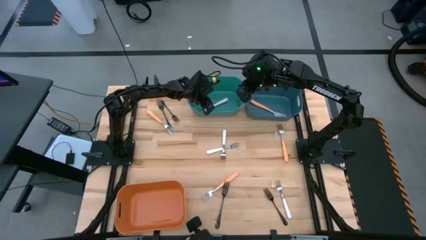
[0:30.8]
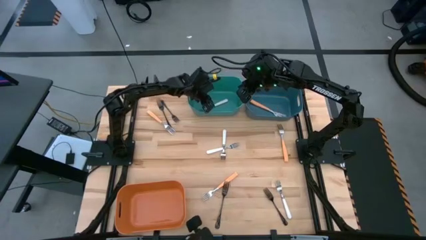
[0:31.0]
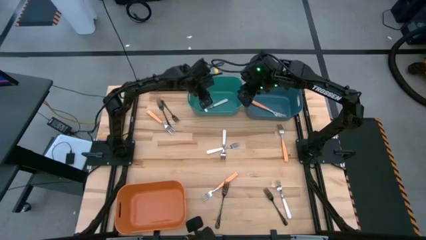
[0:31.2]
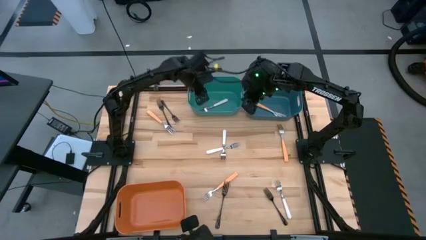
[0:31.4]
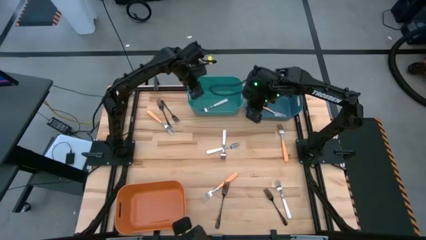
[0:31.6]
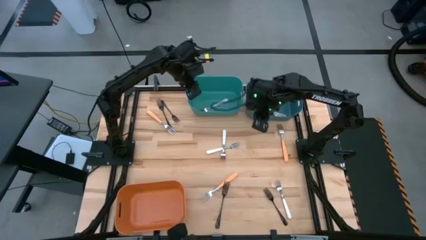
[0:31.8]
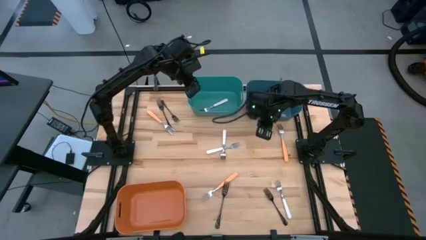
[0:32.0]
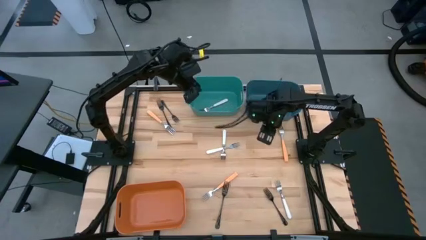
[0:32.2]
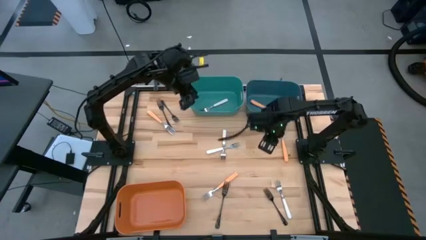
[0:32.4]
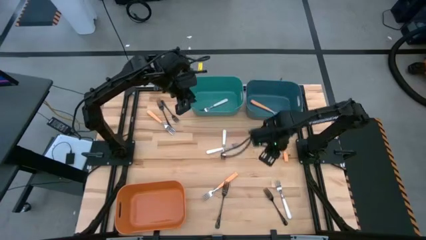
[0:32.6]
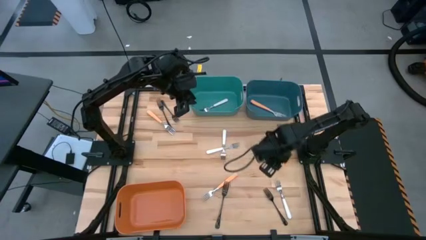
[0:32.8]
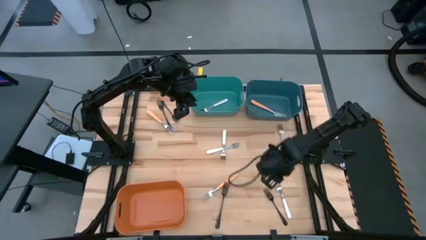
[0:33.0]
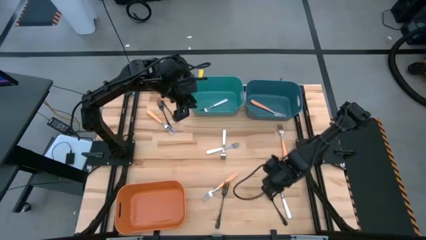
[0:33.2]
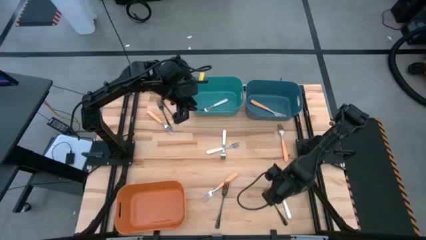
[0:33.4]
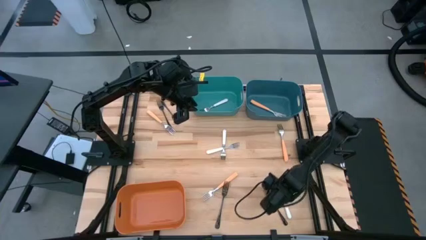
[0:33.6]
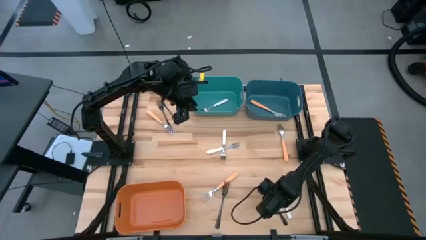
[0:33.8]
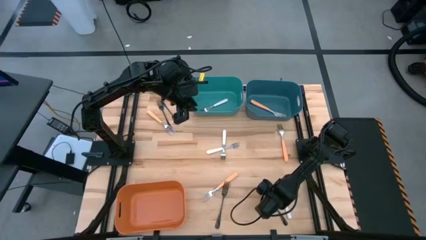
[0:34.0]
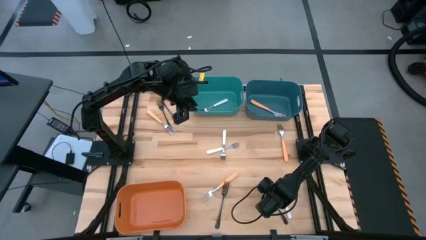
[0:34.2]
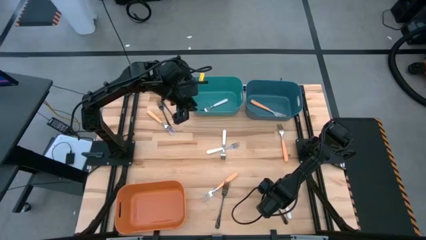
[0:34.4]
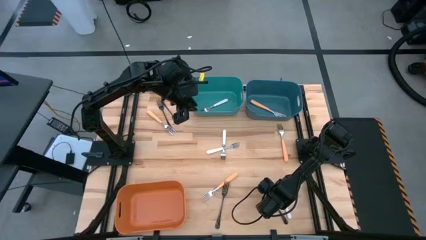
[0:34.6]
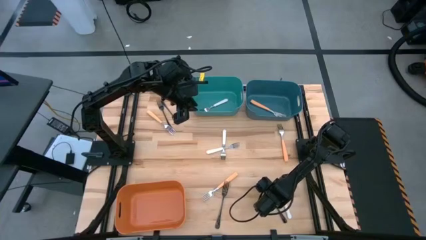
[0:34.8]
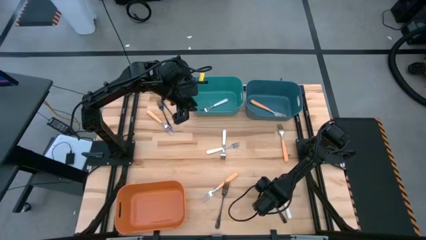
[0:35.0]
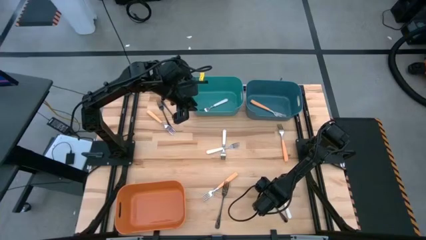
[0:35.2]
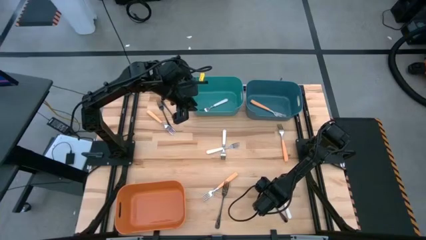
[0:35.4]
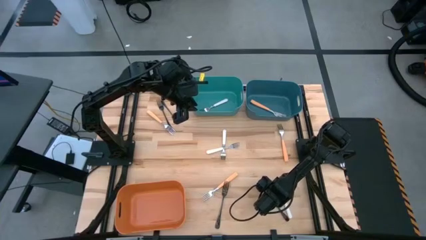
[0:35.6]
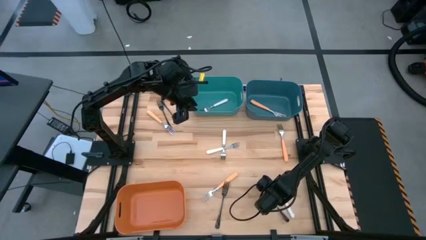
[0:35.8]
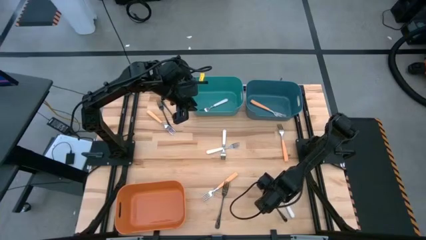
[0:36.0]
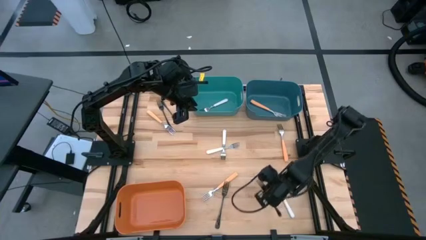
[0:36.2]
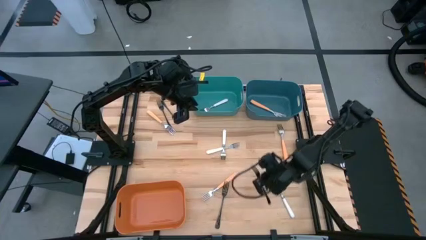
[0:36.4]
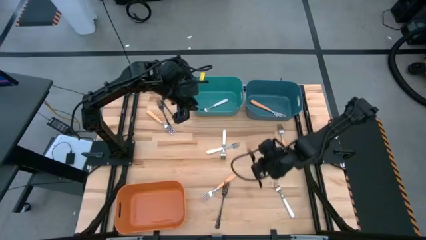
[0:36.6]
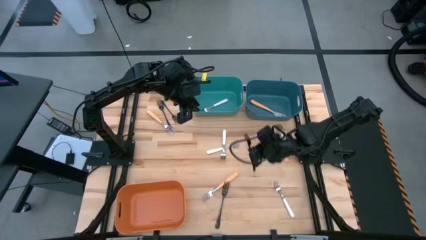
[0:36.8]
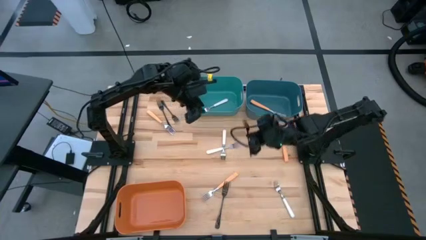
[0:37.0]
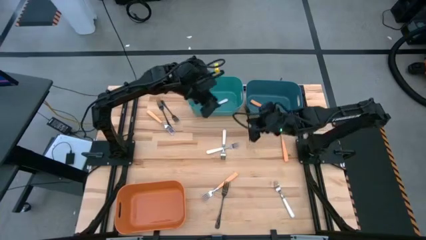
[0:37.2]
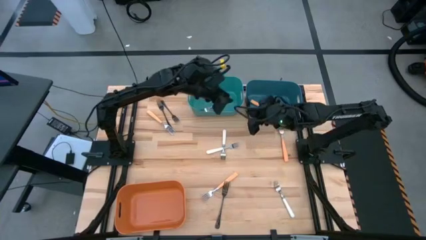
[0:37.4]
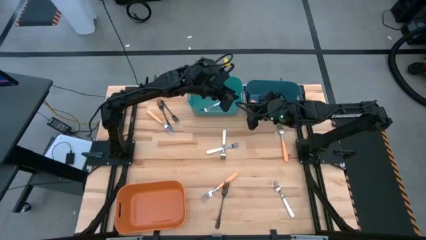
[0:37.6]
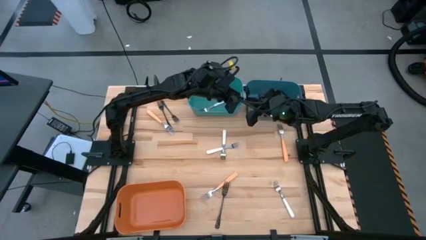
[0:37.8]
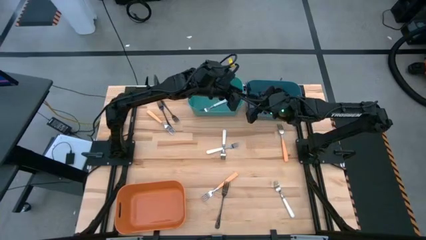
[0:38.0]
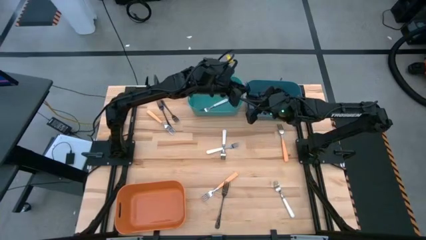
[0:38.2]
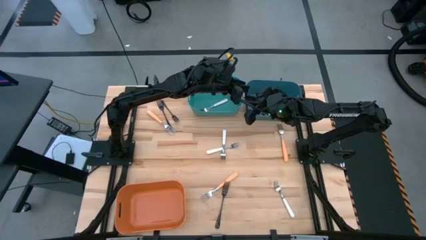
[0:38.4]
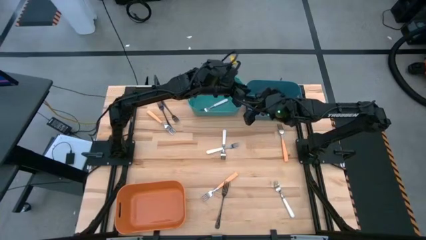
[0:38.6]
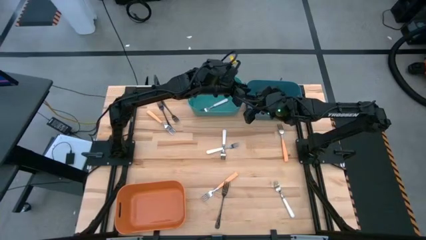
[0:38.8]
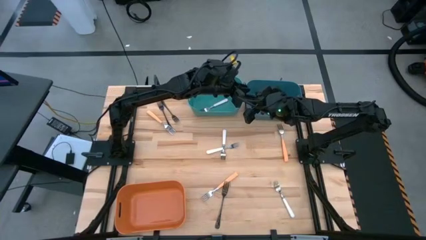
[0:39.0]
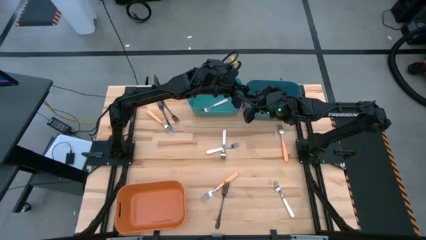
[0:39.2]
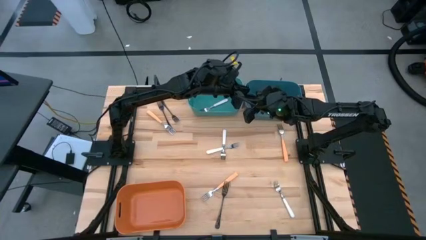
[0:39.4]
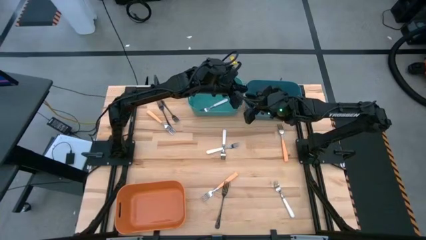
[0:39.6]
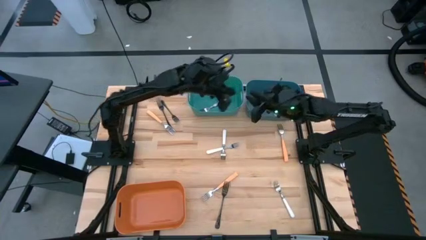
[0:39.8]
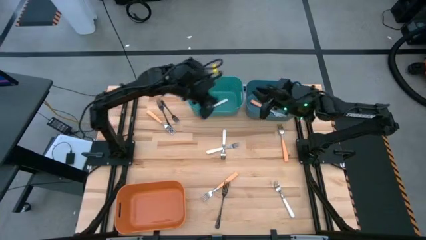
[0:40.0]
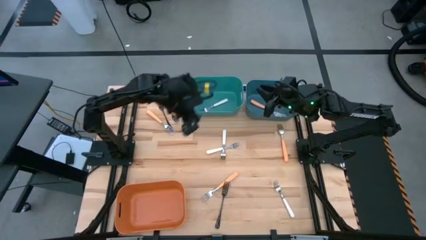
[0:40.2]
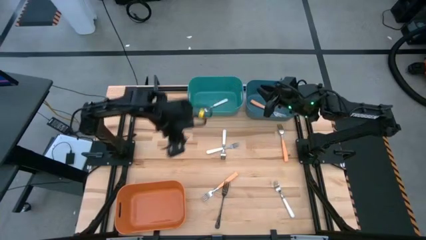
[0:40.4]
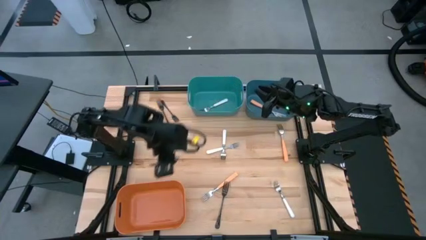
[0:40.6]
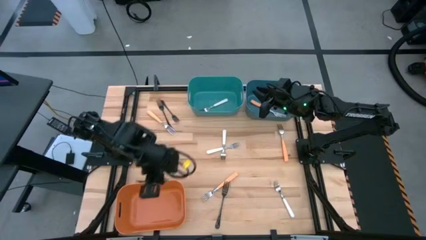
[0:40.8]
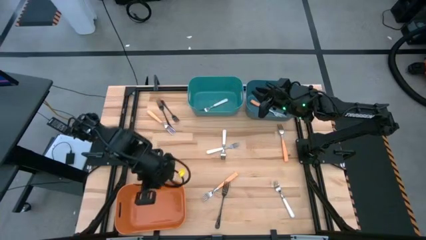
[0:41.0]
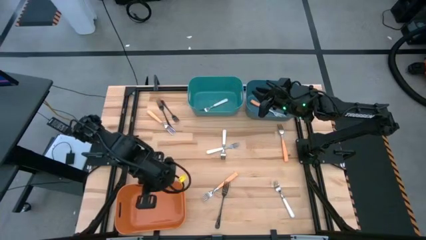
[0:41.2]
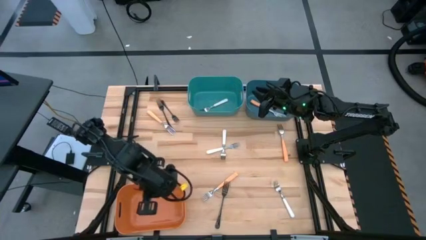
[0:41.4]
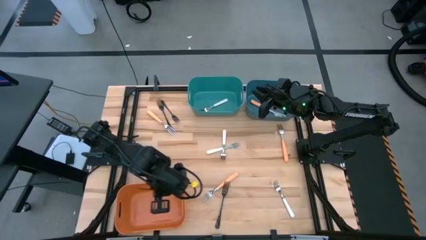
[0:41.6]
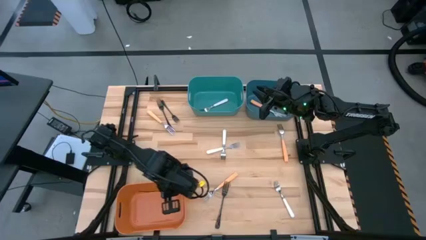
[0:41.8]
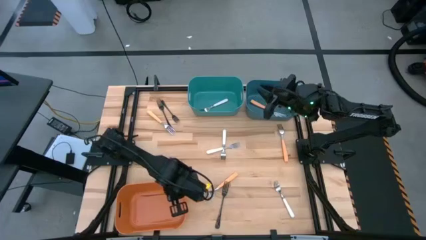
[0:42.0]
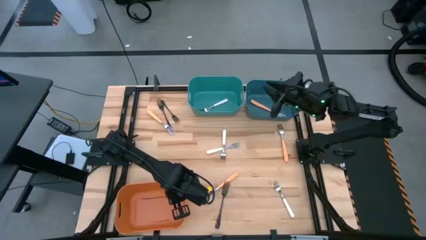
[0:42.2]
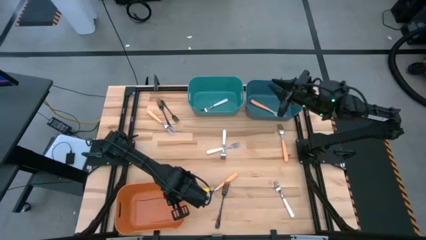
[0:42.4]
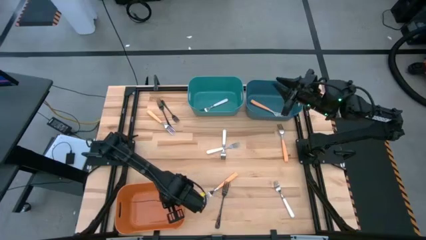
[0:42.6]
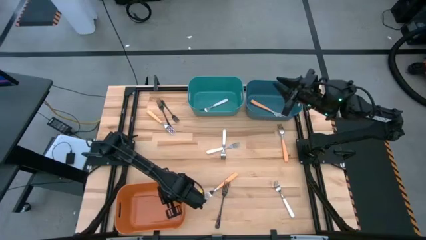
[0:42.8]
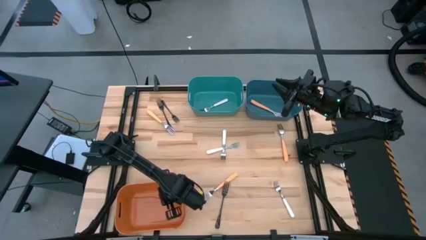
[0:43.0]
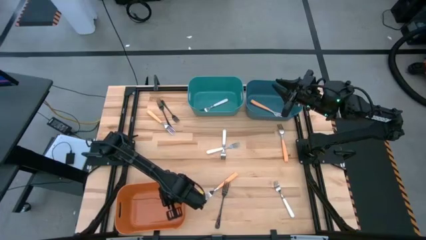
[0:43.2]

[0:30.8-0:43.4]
Task: Sort silverware by color (type)
Put the black fork into the orange bin

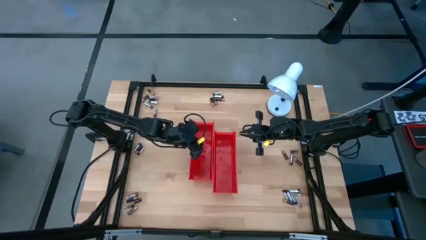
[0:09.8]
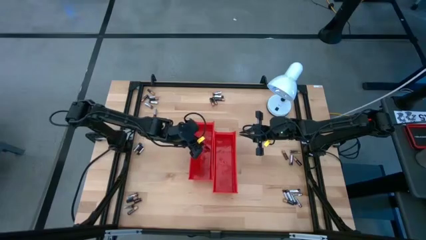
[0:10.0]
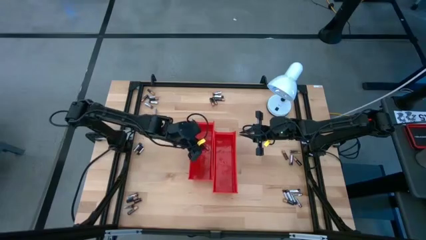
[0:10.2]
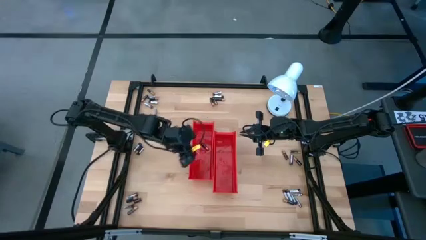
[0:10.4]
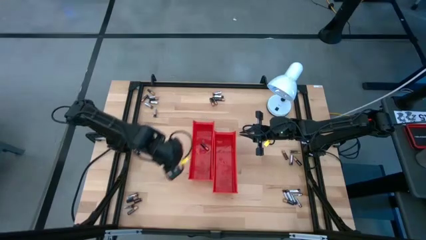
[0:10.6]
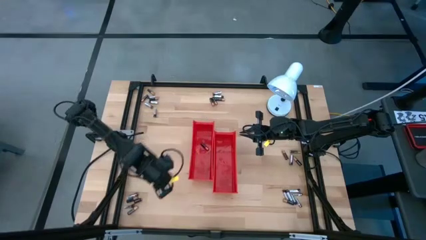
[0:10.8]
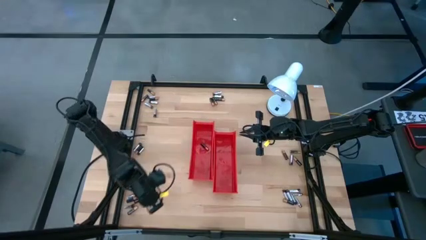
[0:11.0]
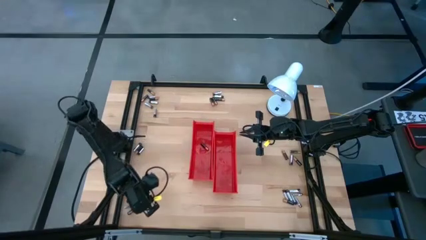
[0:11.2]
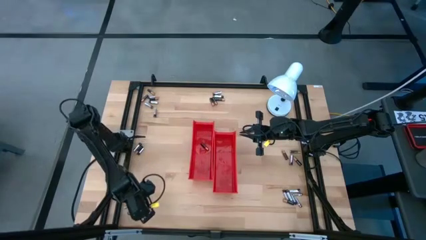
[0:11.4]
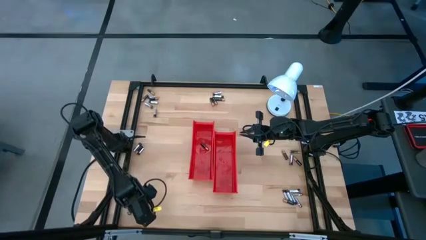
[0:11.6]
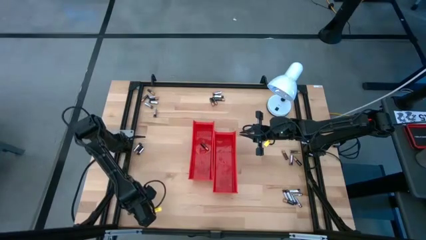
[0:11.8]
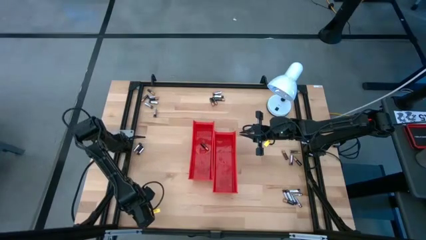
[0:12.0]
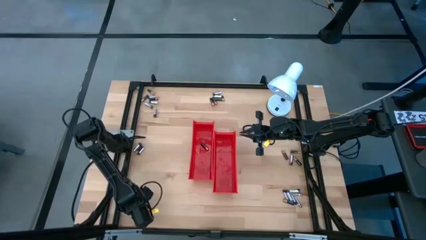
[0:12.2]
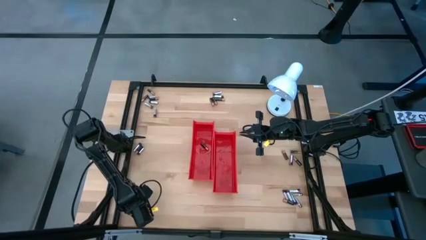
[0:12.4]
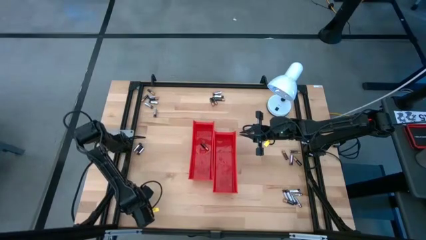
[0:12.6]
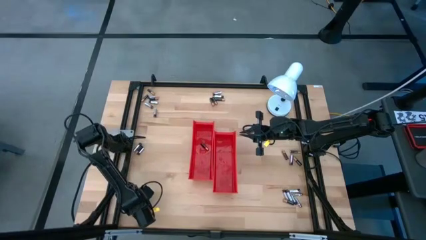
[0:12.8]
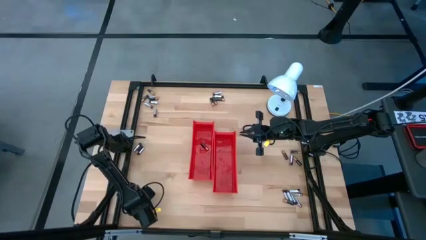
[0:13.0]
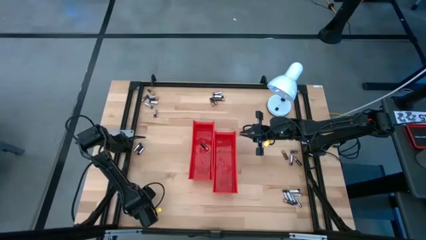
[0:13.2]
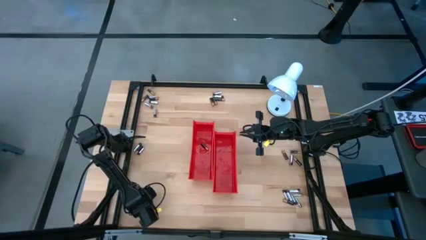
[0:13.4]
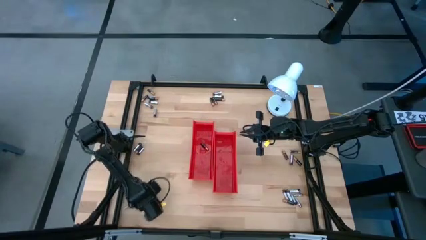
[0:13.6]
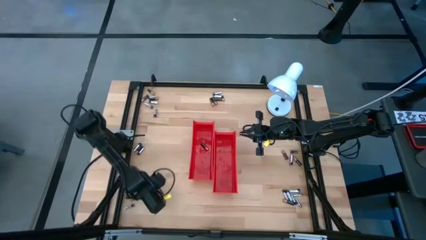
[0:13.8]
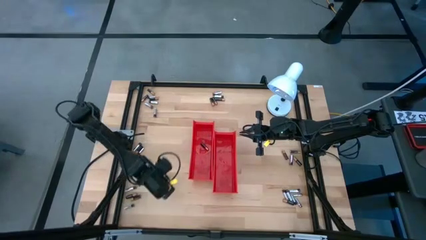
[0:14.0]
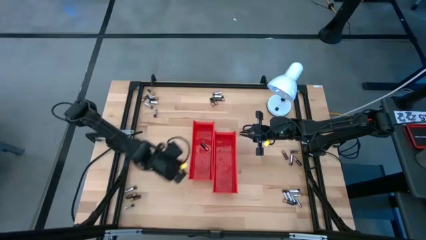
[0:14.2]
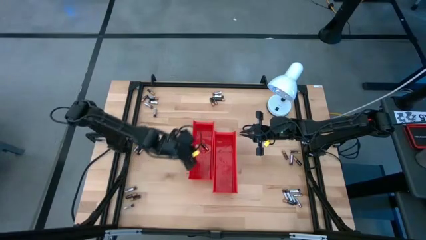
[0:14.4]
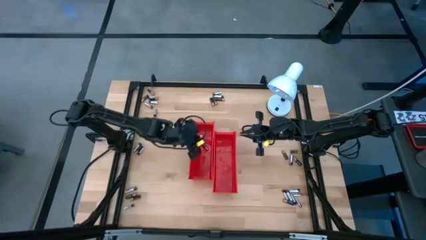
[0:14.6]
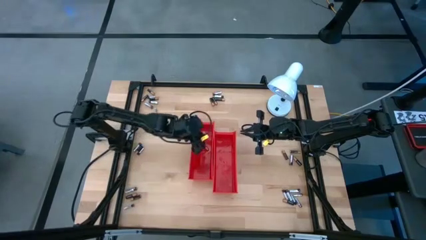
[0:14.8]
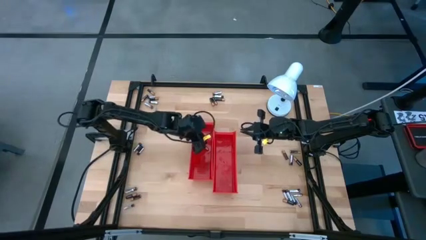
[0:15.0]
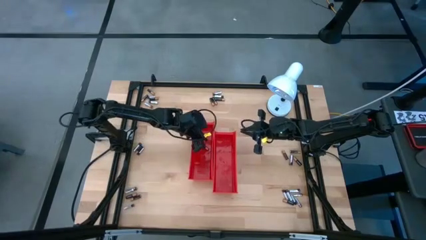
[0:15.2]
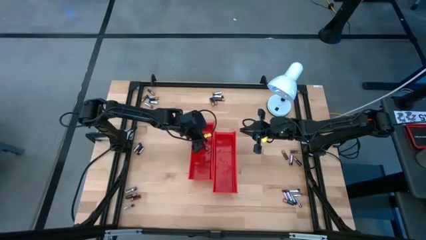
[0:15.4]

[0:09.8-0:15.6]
Task: Sort batteries
Put the black battery into the left red bin
